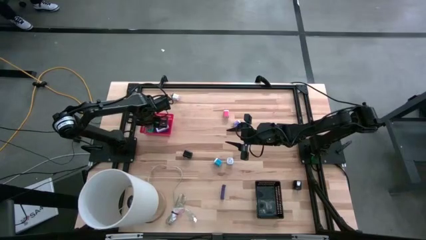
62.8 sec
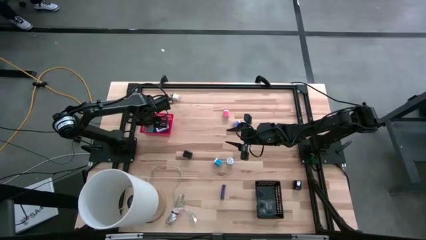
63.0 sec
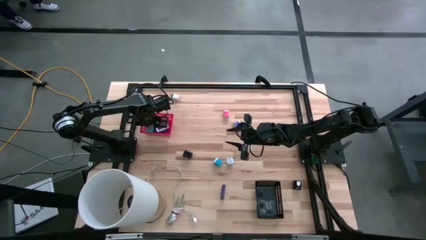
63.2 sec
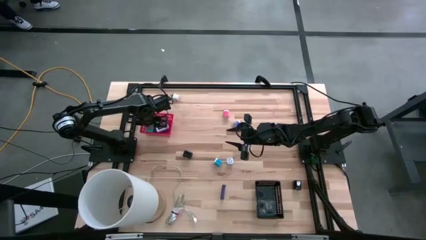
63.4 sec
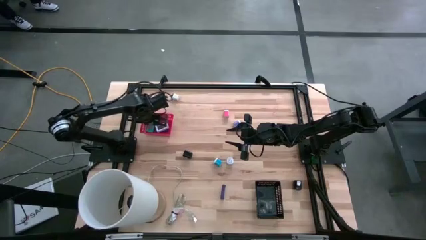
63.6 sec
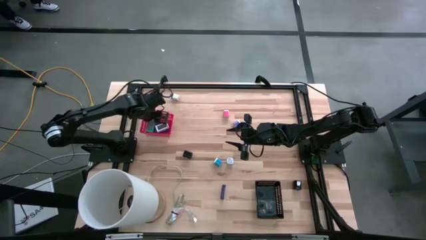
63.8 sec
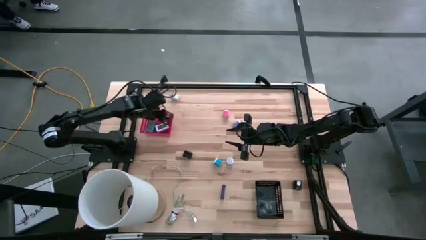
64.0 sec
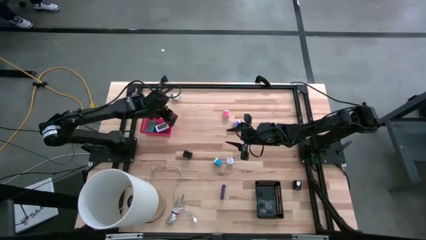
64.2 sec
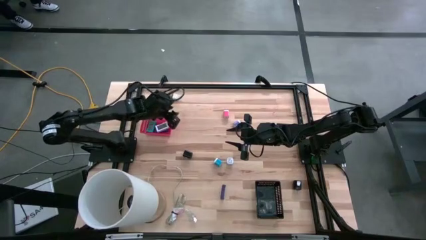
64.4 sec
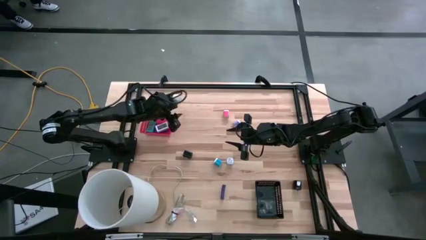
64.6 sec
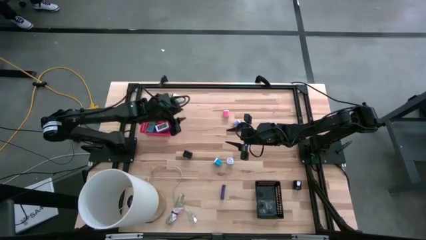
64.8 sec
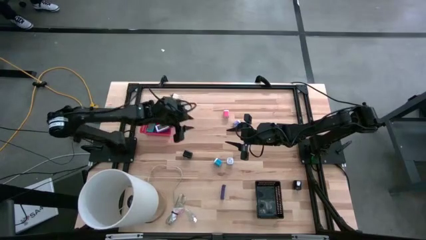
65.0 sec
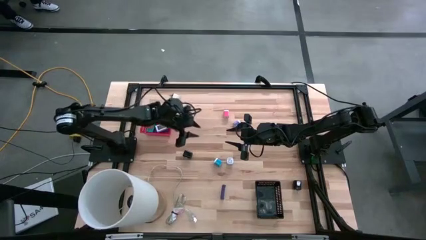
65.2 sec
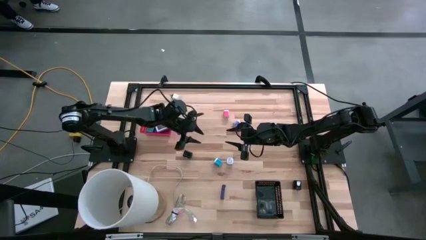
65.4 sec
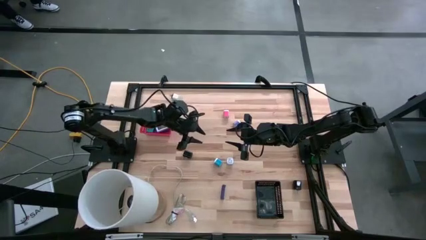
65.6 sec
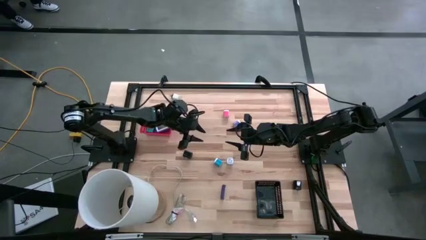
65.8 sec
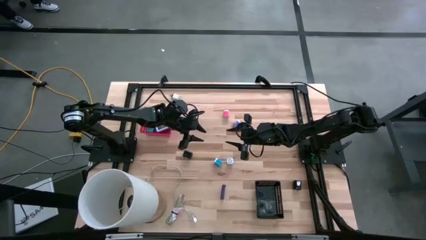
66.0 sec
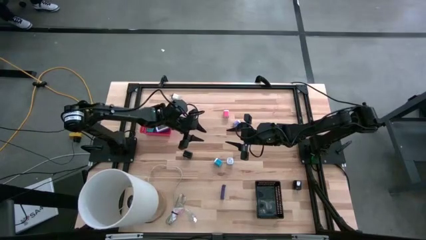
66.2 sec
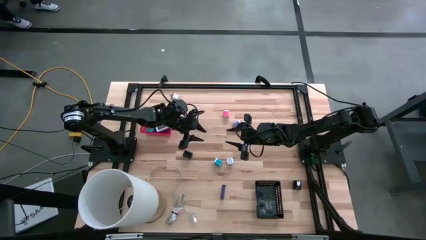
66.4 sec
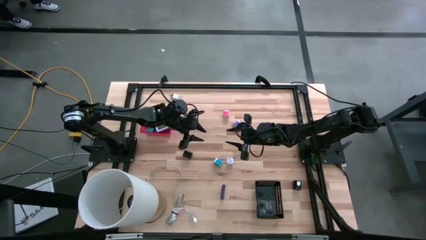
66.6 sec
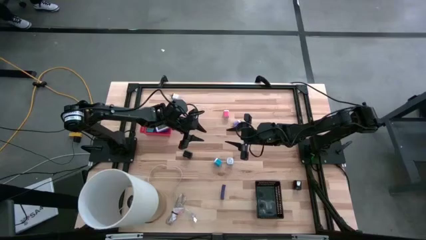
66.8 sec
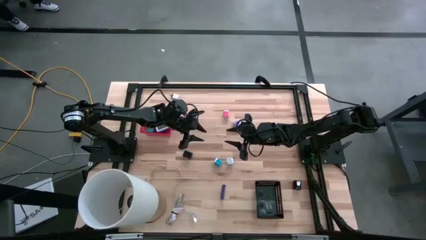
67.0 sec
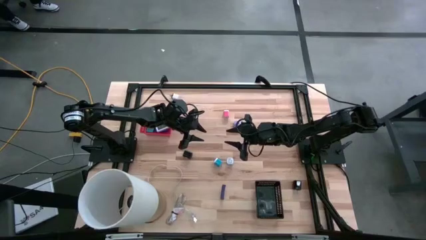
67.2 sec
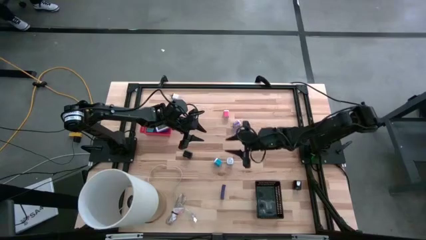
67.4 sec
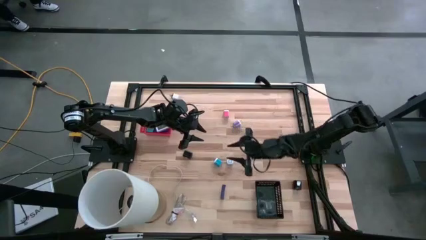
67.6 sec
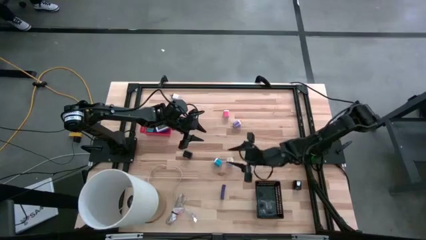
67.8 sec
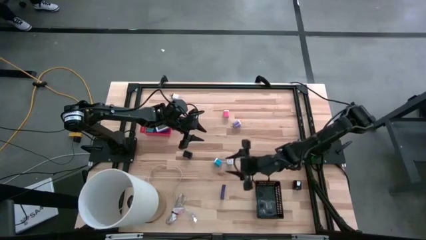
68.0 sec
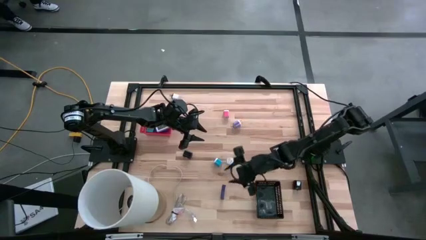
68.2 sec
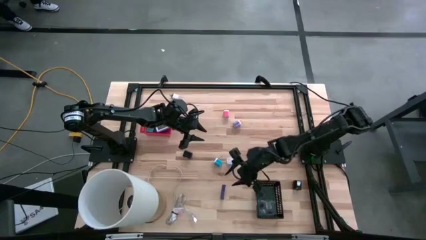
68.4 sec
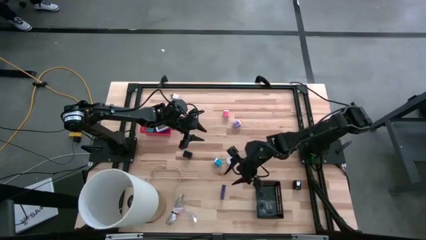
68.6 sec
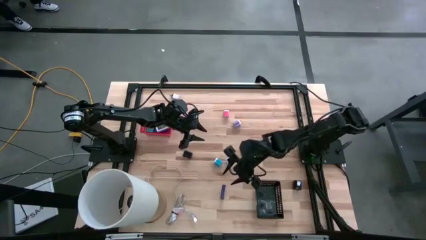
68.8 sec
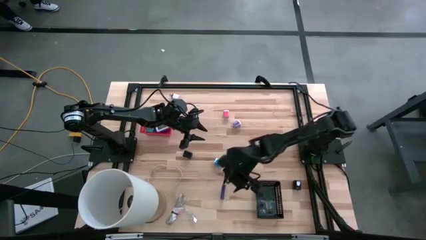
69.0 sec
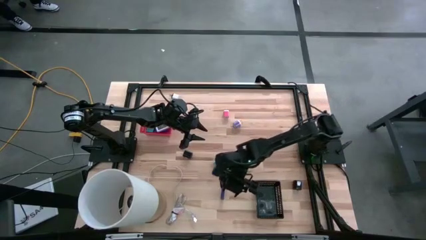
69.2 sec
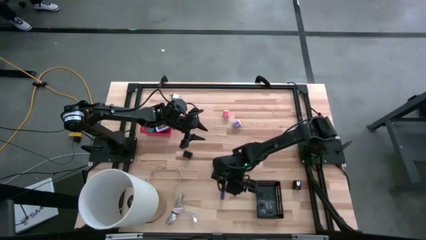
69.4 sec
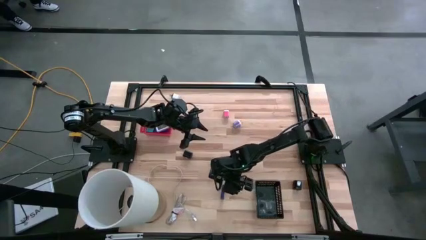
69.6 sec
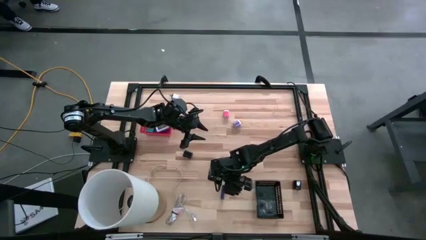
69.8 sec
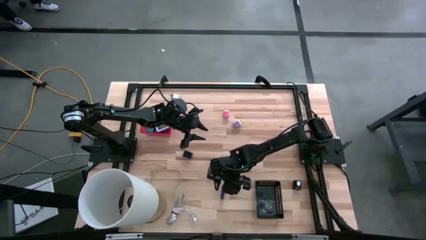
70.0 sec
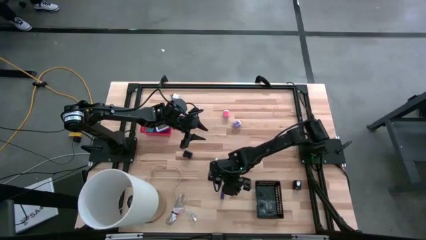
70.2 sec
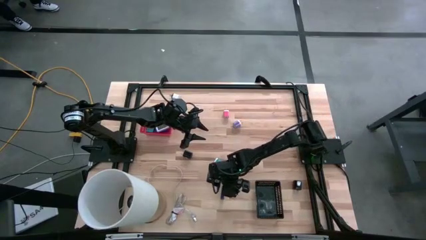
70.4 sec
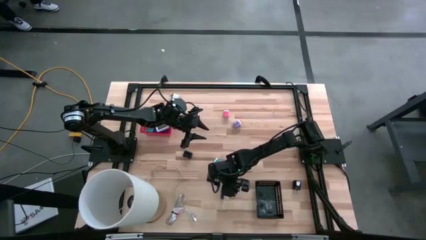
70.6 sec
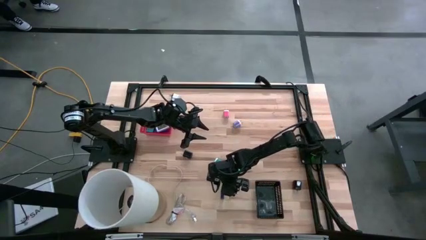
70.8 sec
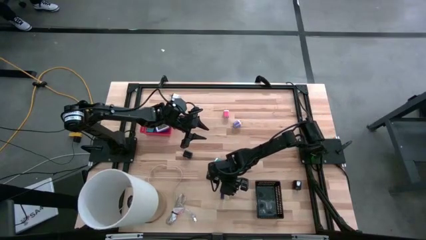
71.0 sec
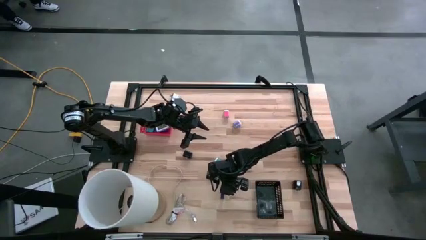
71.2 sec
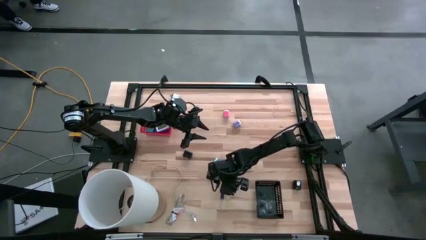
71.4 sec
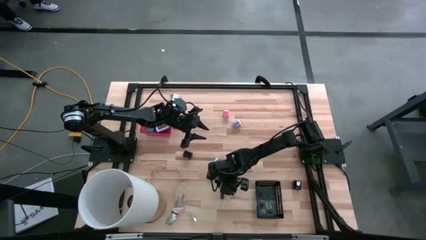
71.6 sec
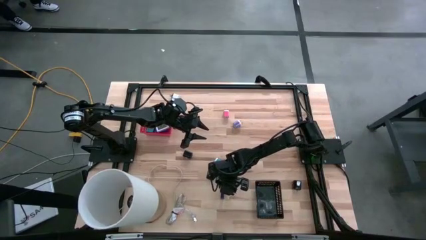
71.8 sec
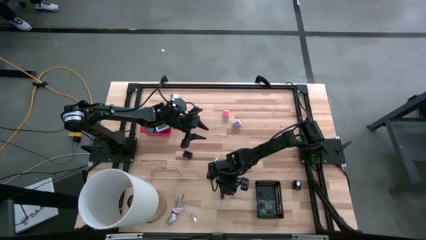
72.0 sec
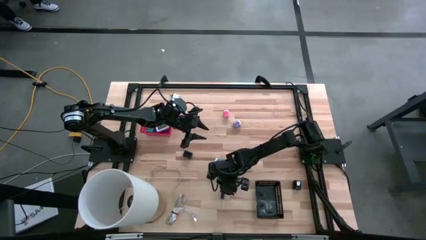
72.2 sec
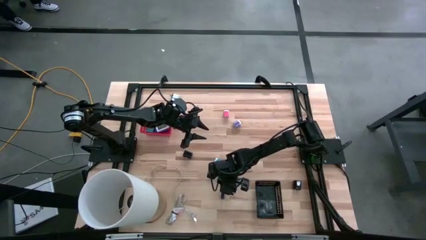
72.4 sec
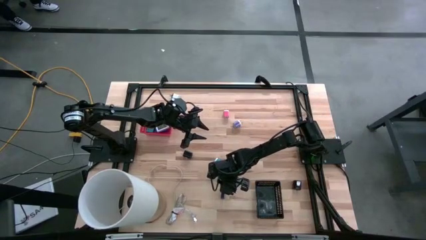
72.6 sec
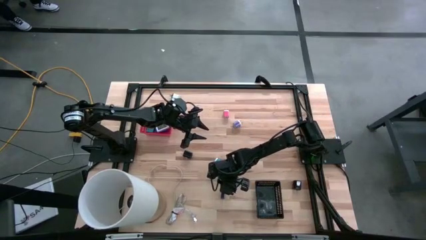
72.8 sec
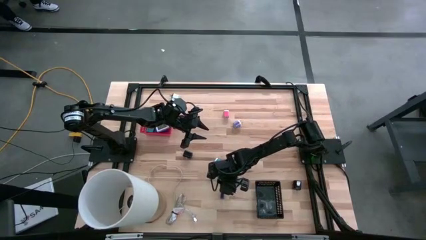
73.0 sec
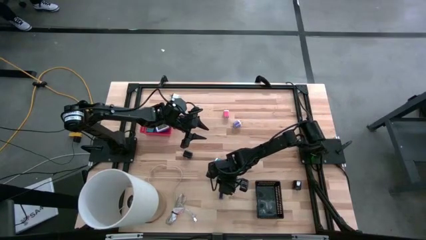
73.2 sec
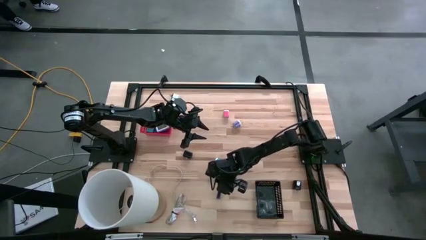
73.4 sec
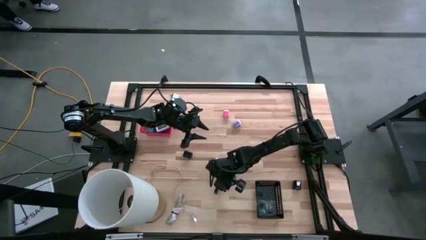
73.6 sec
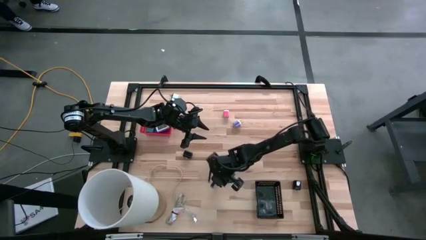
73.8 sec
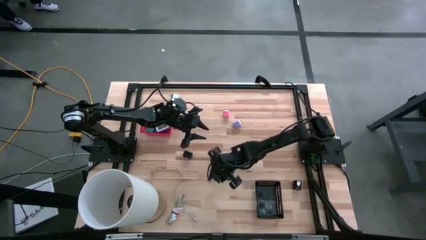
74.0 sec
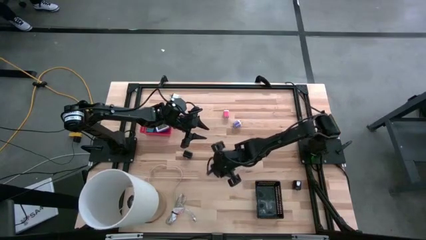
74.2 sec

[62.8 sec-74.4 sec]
Task: Pick & Place Office items
Put the purple digital clock into the red bin

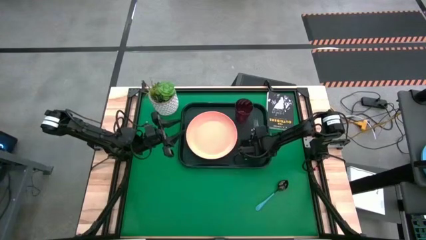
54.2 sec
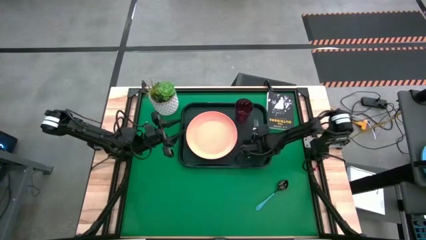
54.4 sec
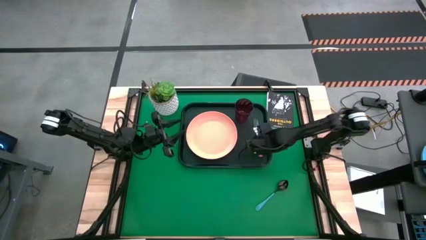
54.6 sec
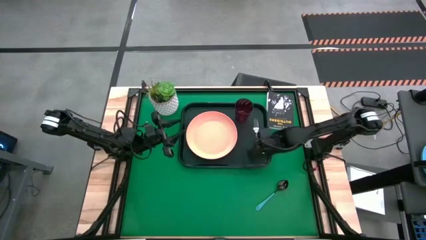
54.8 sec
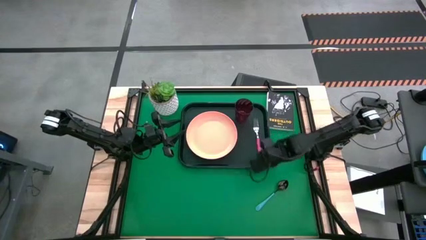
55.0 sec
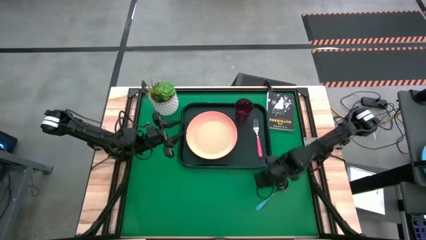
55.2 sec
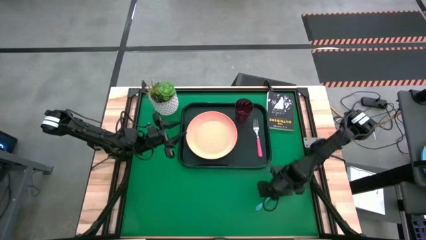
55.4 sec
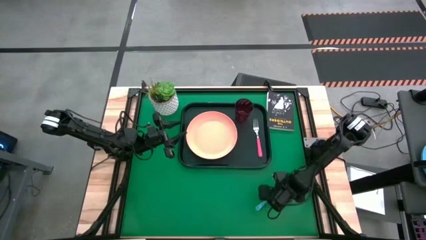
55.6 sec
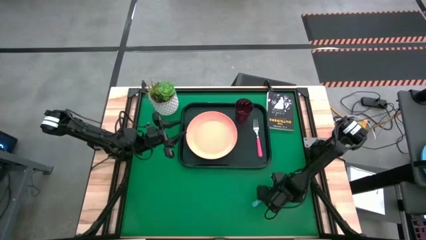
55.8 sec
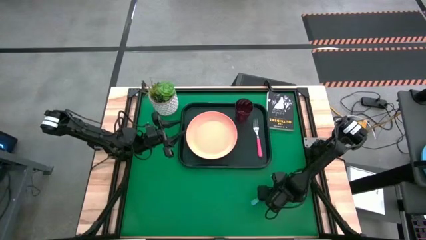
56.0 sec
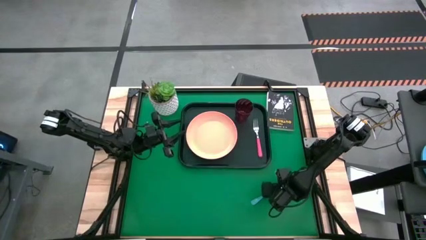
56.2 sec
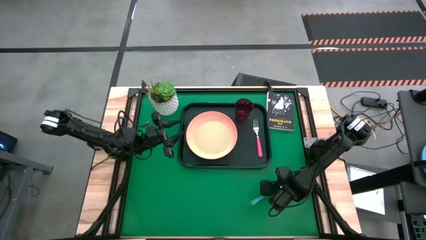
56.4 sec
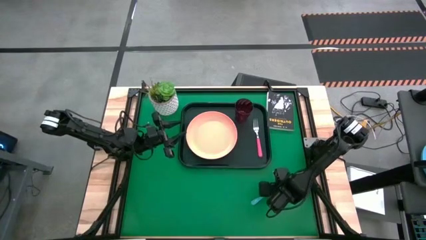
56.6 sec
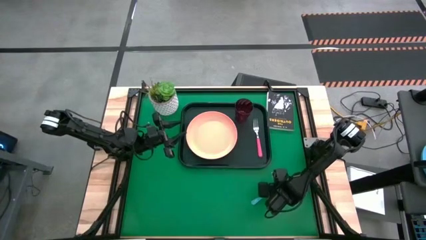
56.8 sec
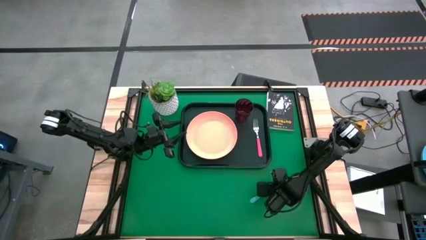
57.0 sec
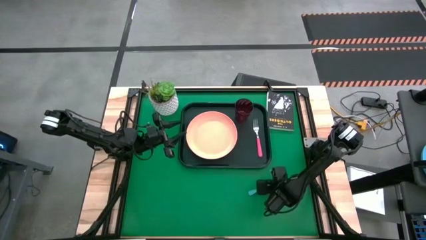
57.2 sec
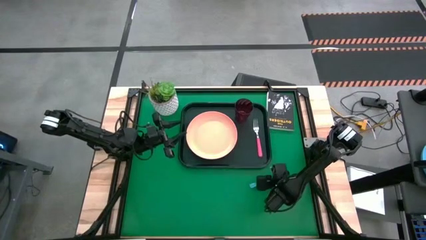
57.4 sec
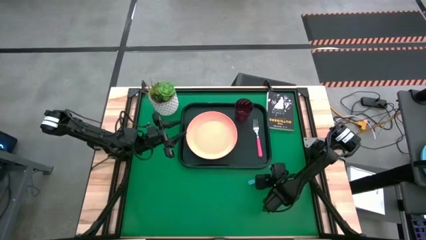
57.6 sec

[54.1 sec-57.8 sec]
Task: Pick and place plate/cup/fork/spoon on tray
Put the blue spoon on the dark green serving tray to the right of the orange plate
